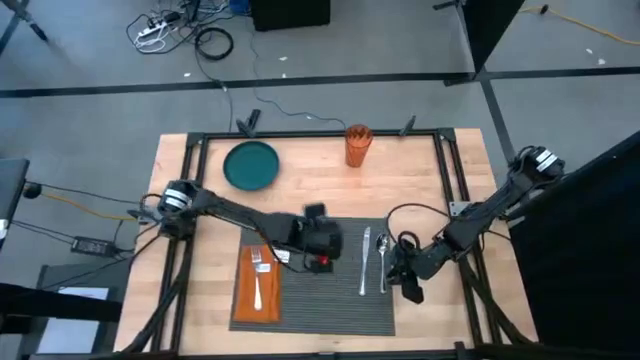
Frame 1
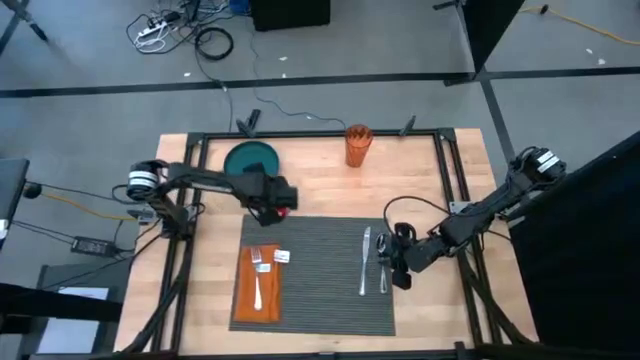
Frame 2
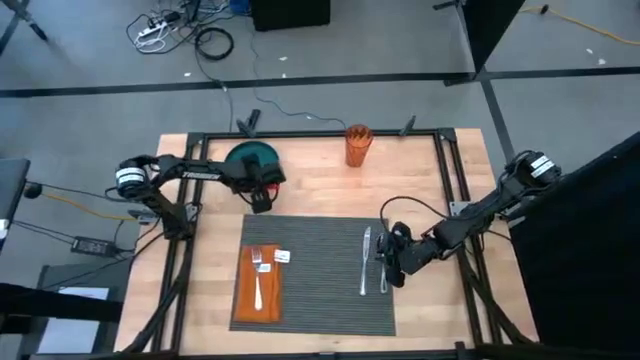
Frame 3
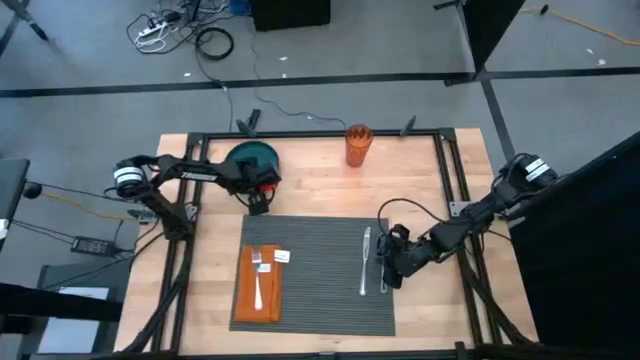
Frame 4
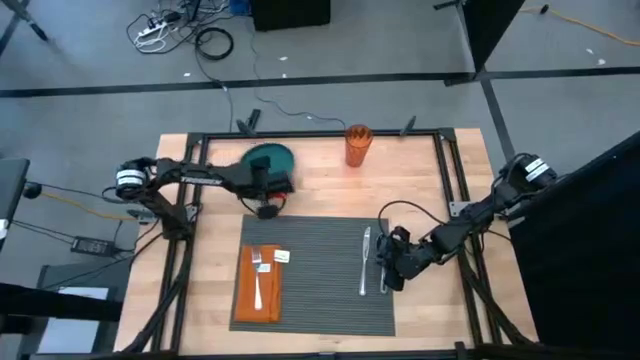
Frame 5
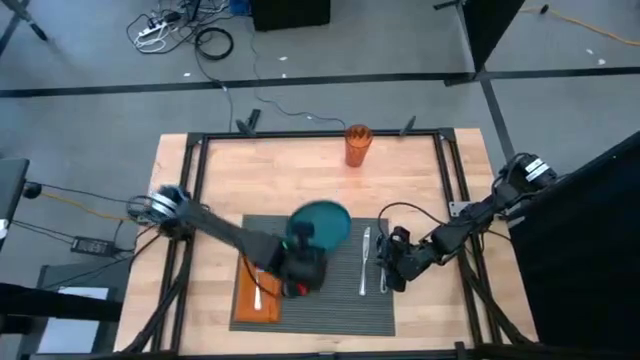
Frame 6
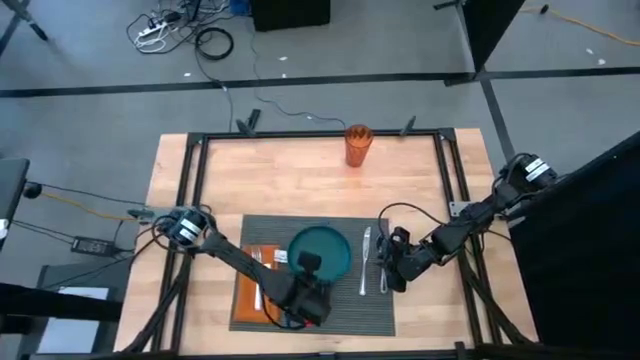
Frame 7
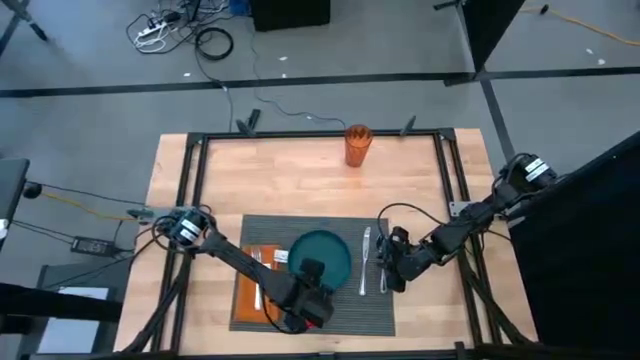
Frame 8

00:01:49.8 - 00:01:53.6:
Task: Set table place
Put the blue plate on the center of the black table placemat

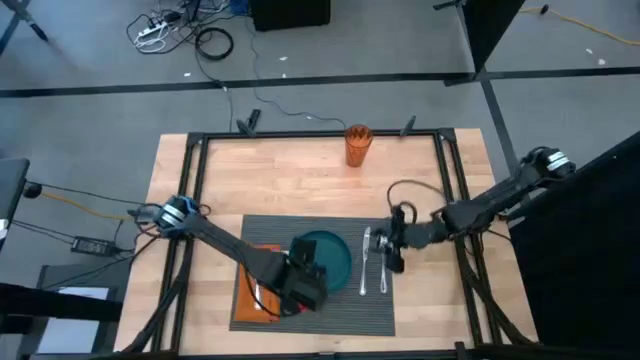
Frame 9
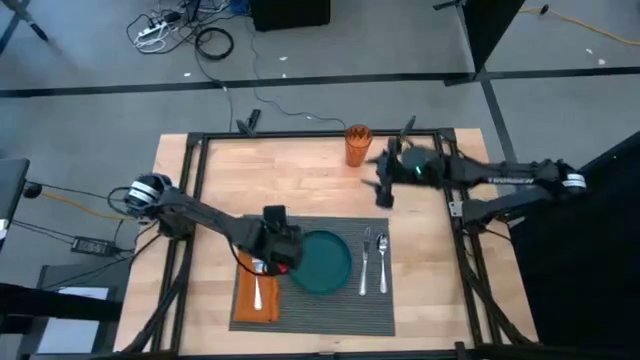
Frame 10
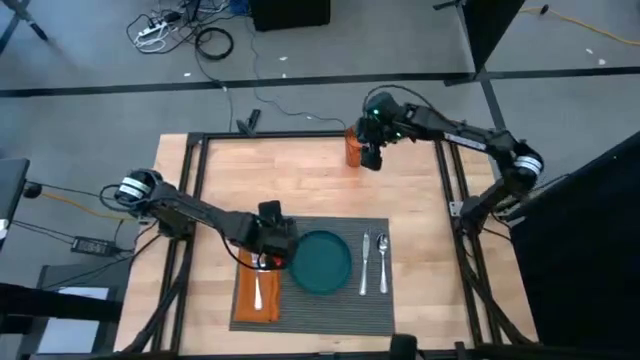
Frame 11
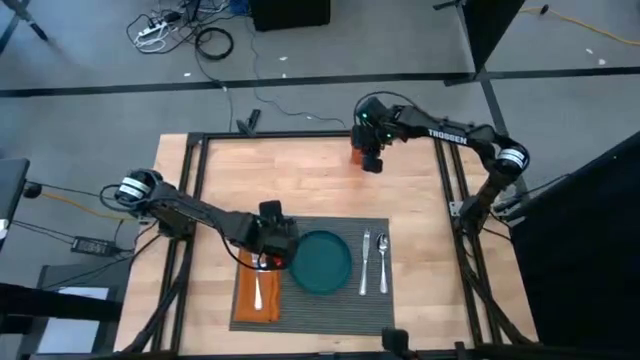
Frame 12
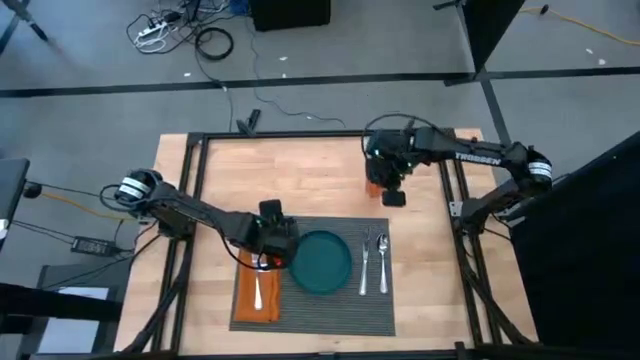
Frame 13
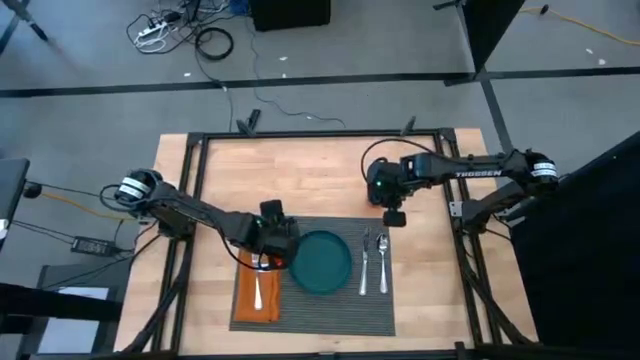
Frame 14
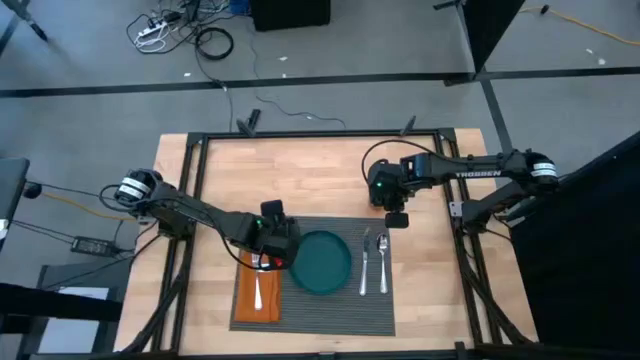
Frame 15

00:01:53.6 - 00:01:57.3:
Move the orange glass cup to the top right of the black table placemat

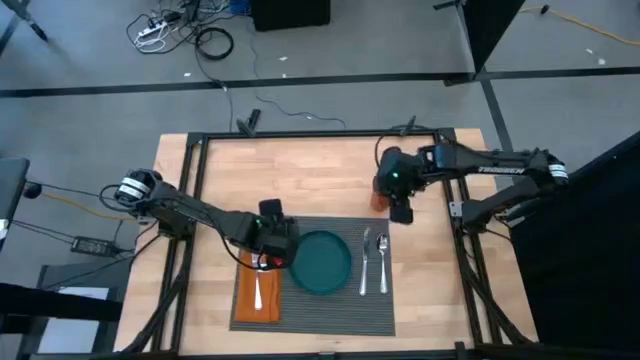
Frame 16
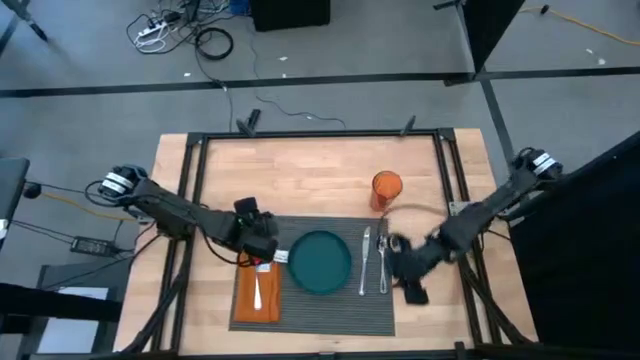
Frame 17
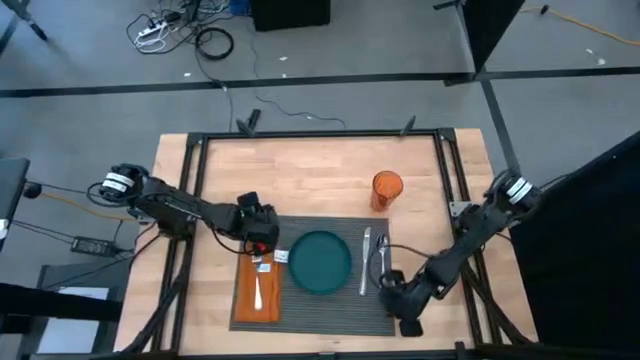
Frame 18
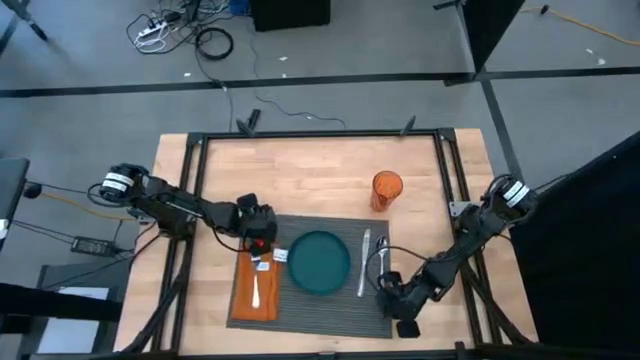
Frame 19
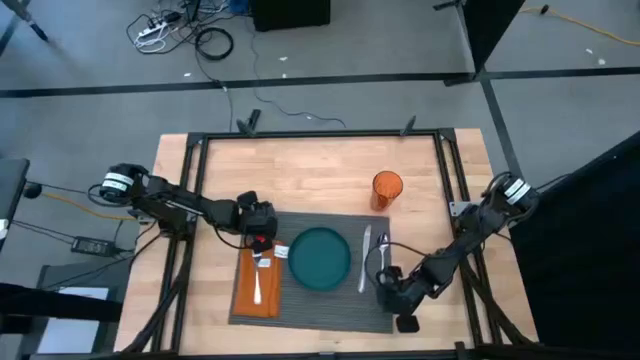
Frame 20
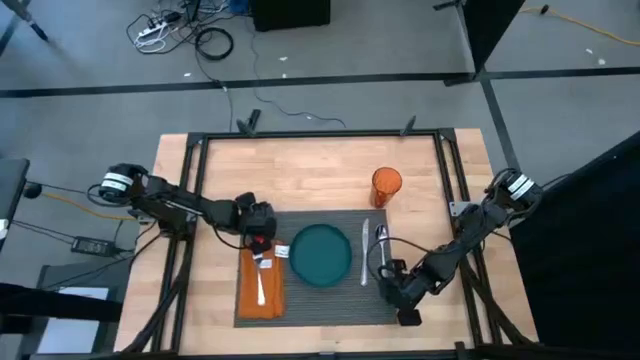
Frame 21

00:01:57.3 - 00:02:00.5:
Adjust the black table placemat

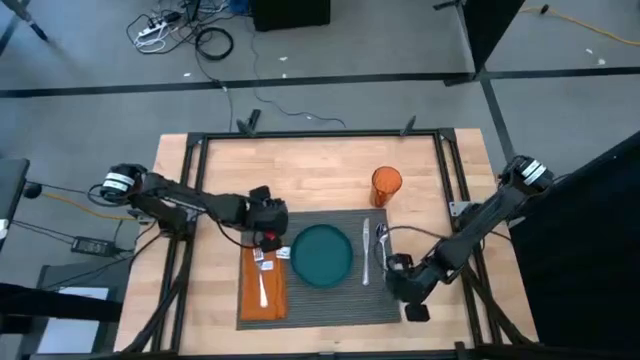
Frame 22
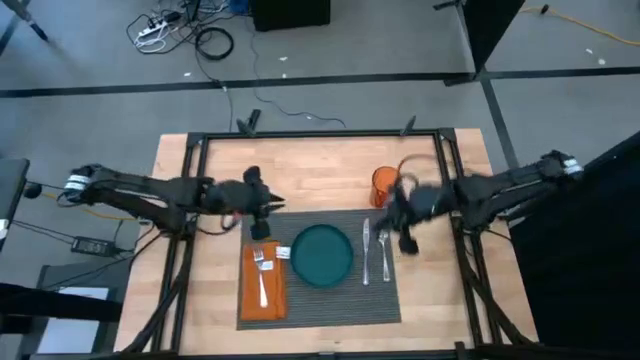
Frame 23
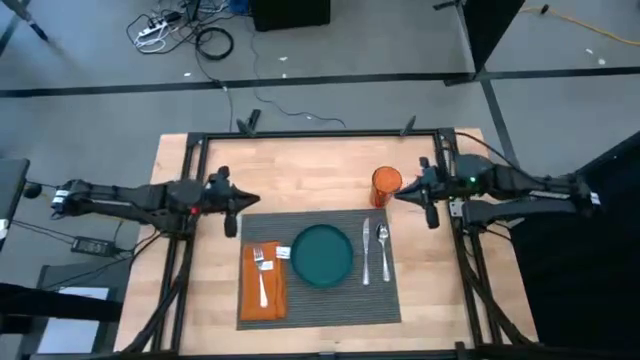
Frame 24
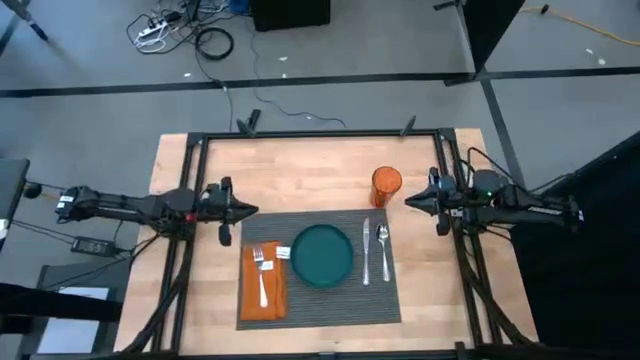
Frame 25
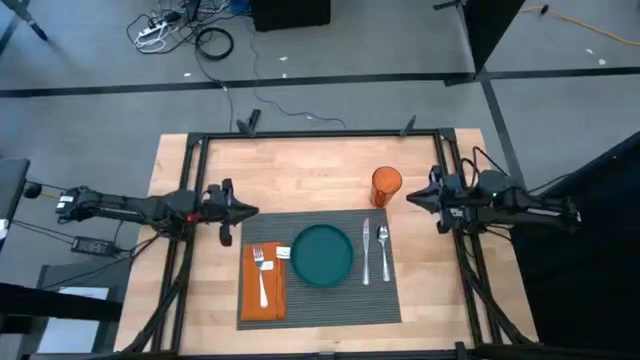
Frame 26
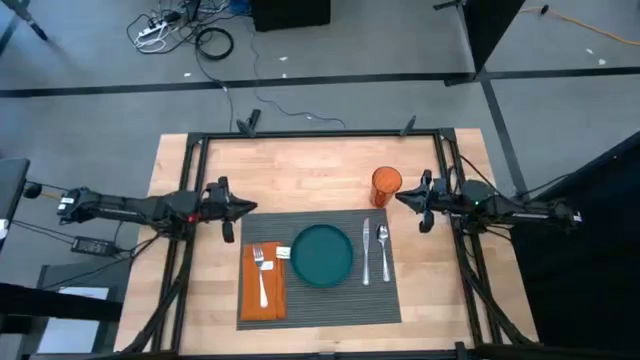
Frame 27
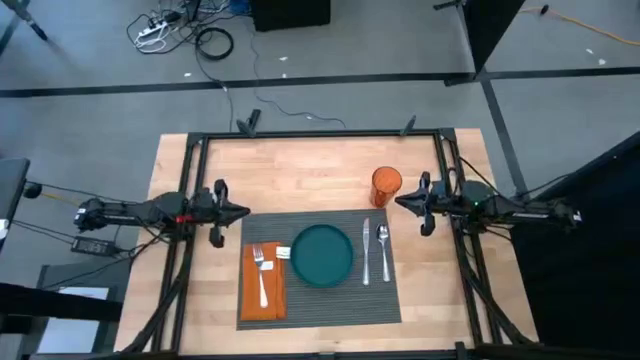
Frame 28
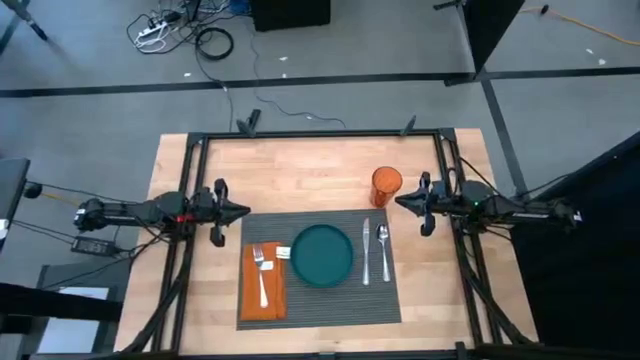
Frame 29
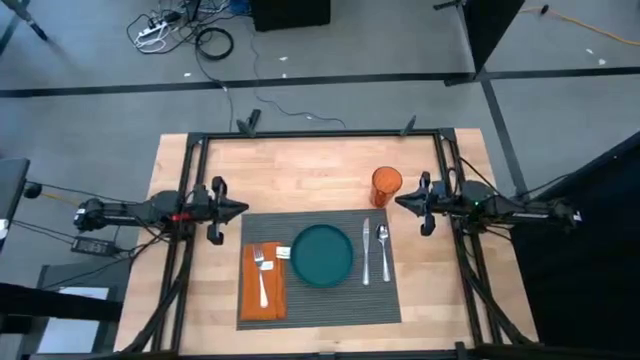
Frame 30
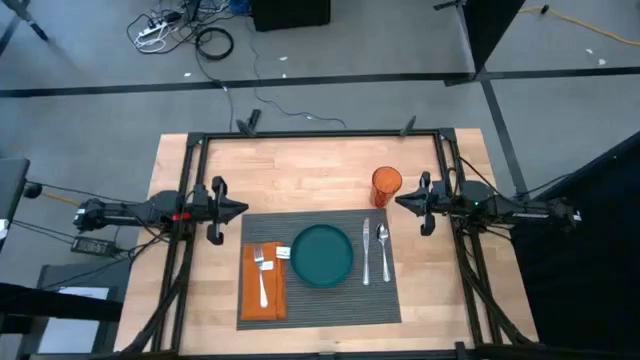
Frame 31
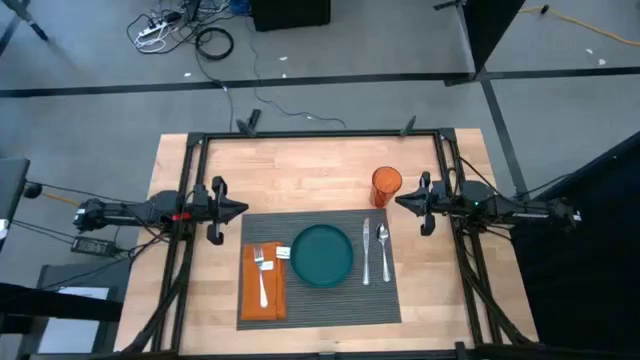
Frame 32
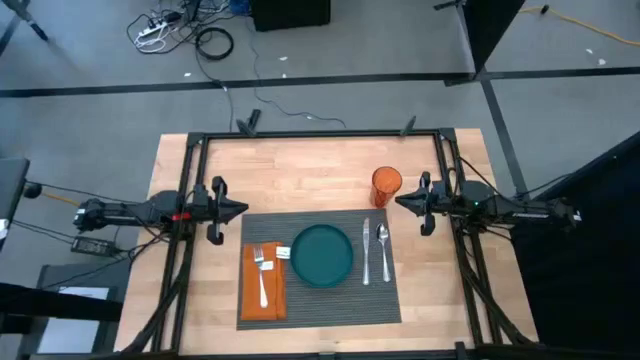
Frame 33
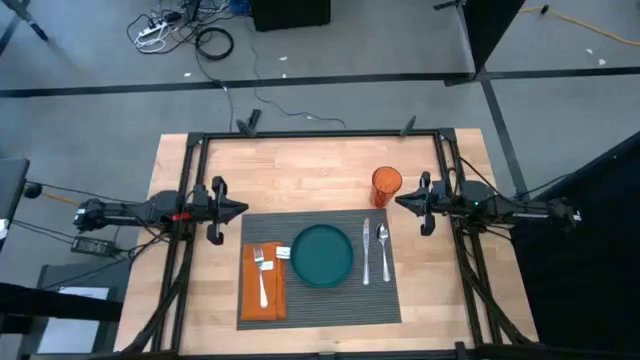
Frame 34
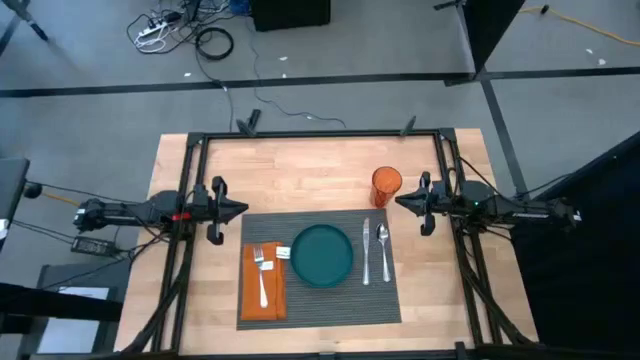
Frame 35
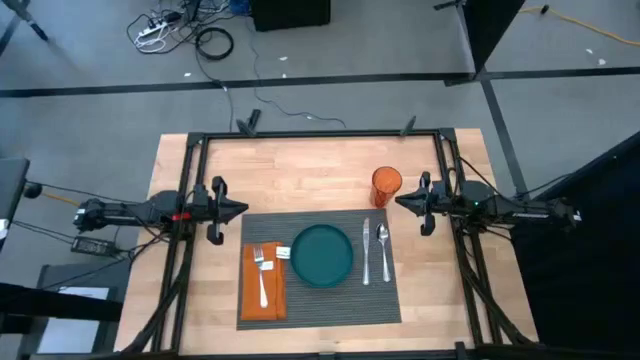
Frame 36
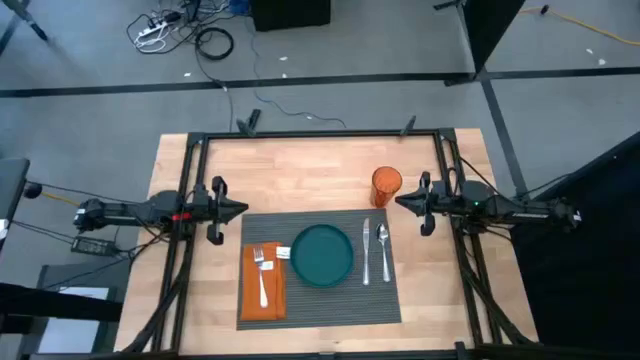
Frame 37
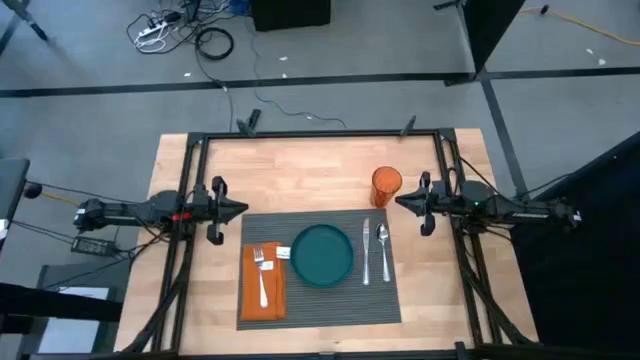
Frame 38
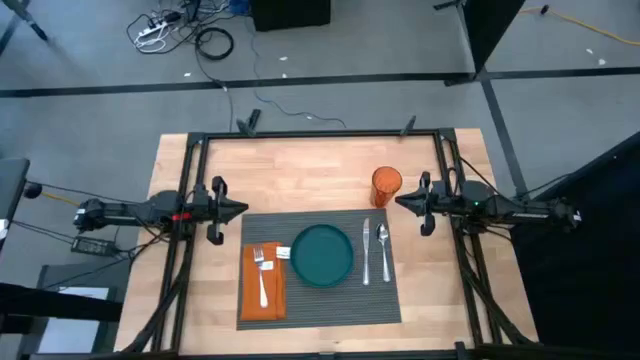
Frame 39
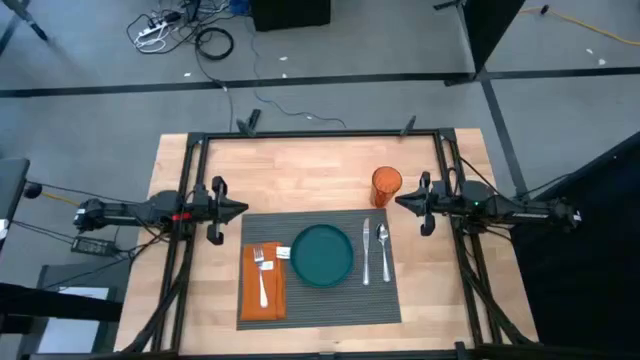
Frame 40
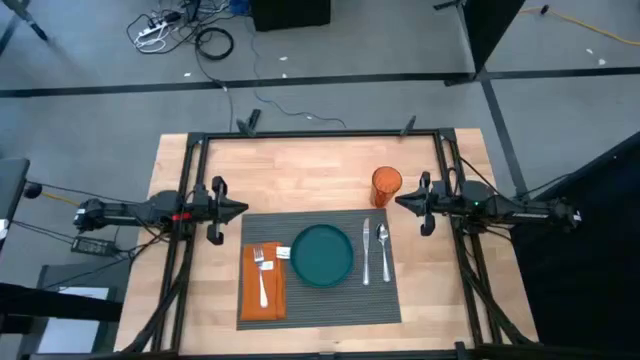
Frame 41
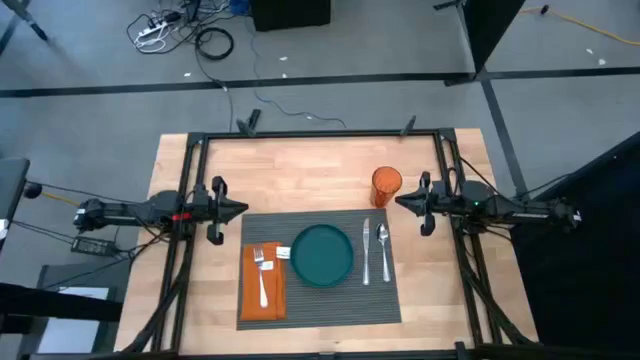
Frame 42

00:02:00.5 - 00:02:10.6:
Return to Home Position
